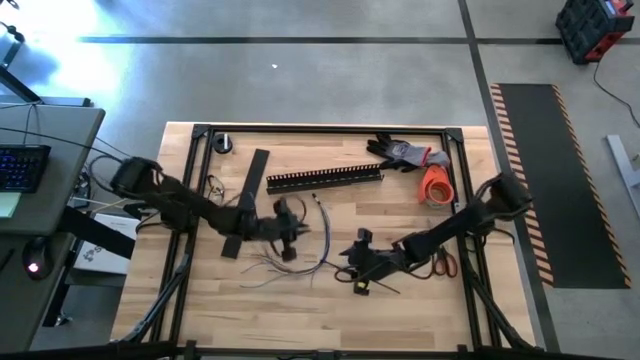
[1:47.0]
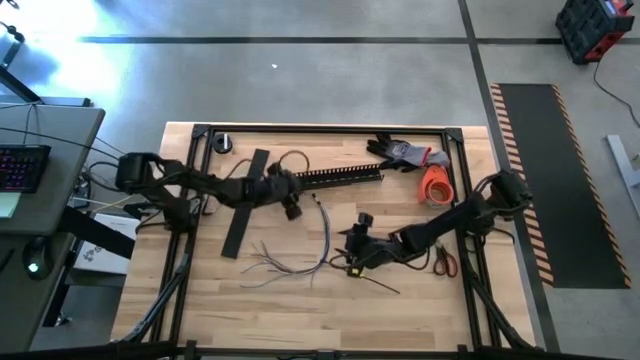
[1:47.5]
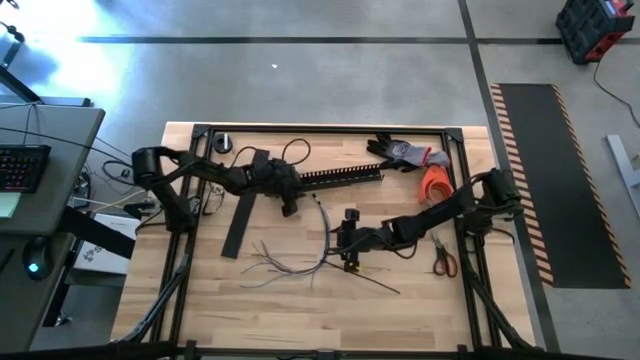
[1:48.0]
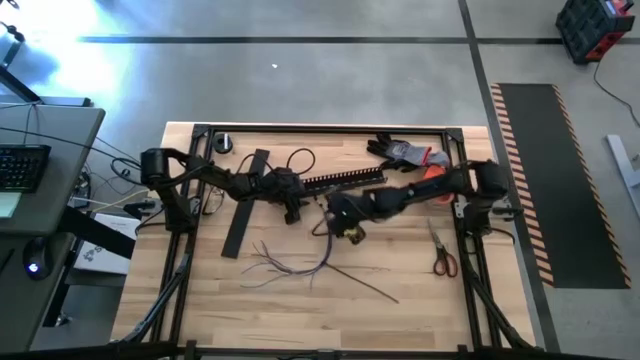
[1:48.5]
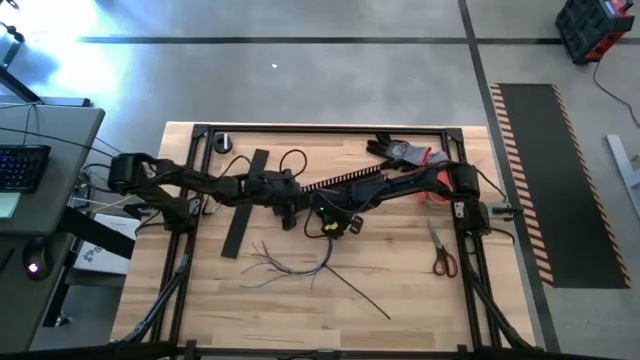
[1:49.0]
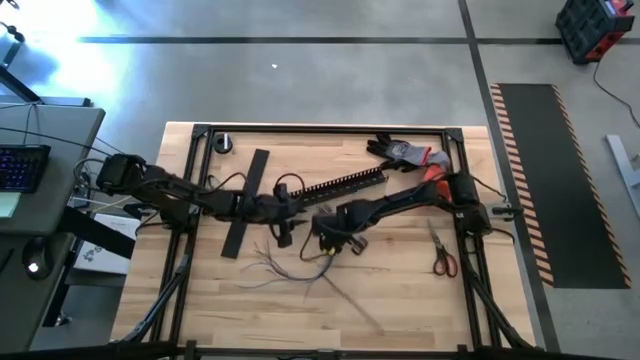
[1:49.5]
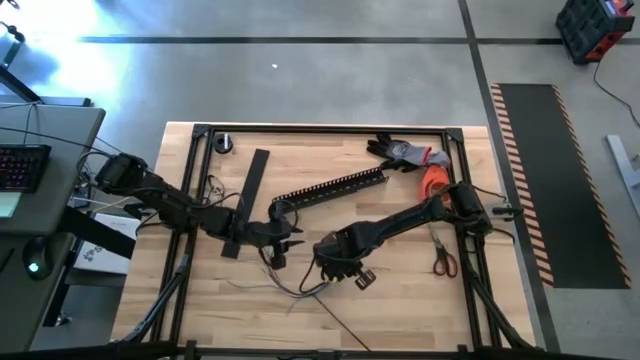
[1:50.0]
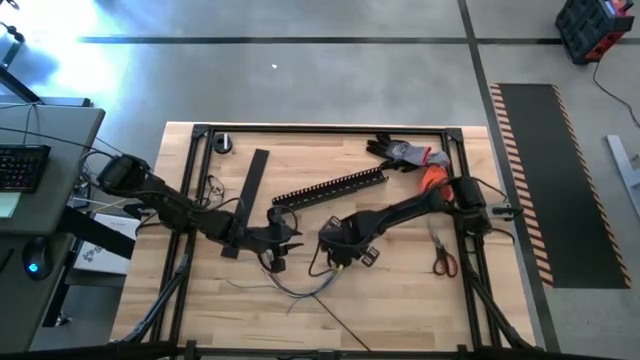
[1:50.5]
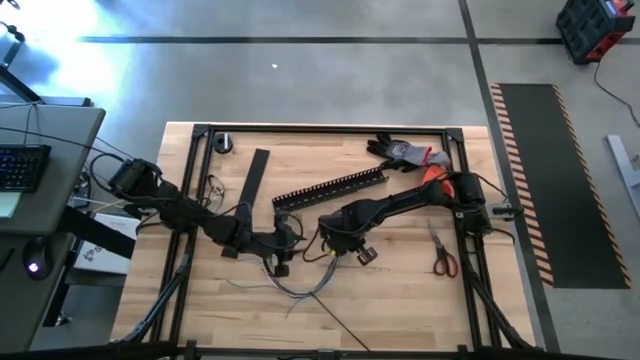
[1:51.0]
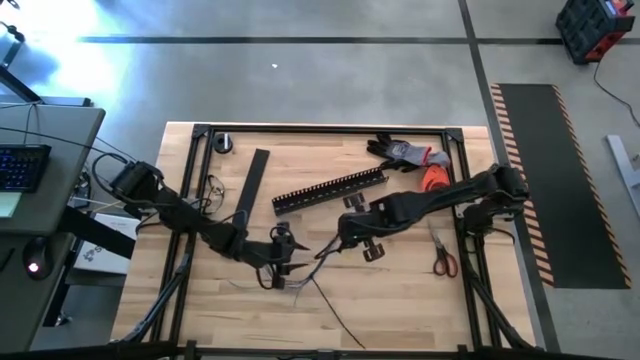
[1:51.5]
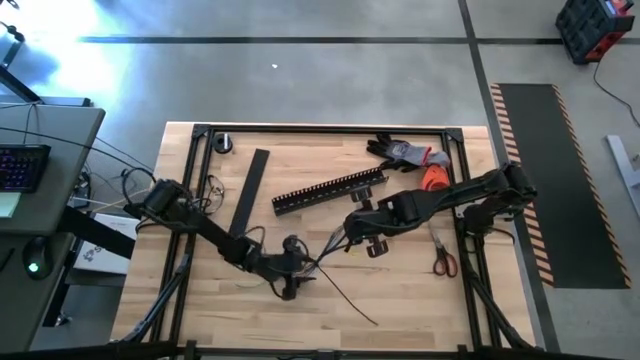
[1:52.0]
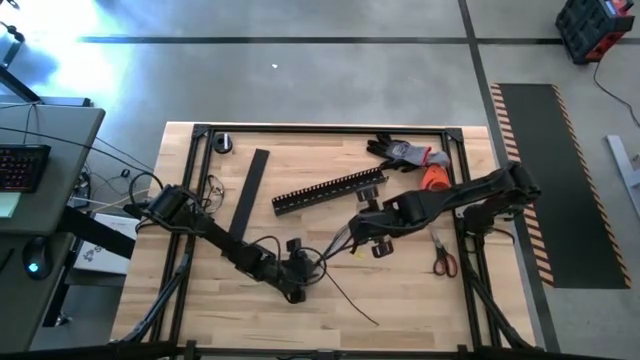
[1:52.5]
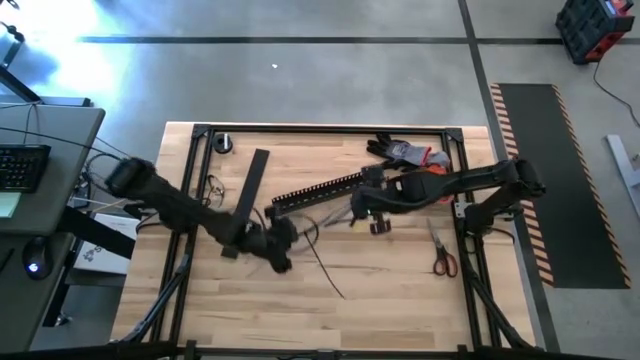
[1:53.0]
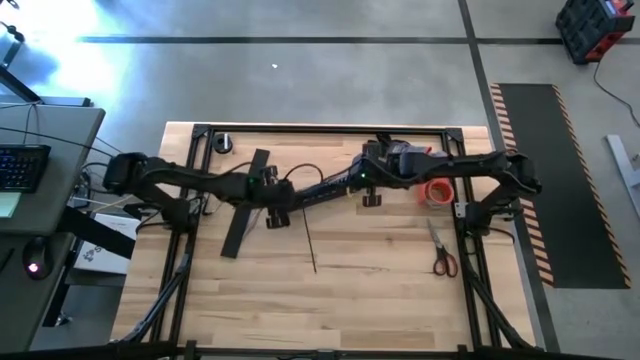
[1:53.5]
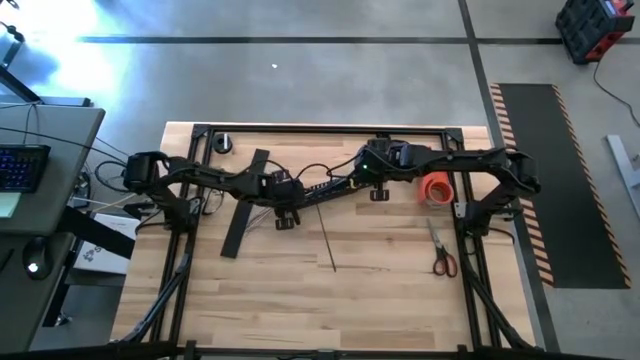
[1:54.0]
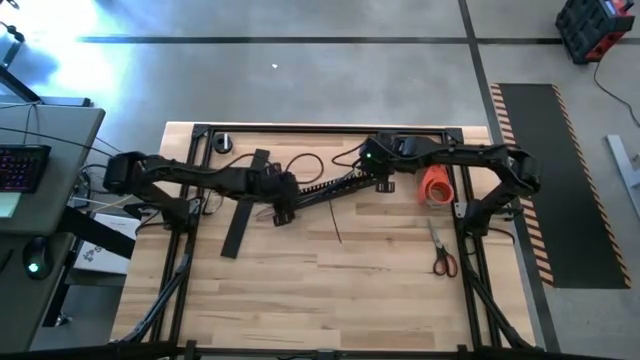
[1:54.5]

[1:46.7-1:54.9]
Task: Ziptie cables
Put the zip-tied cables into the black cable duct

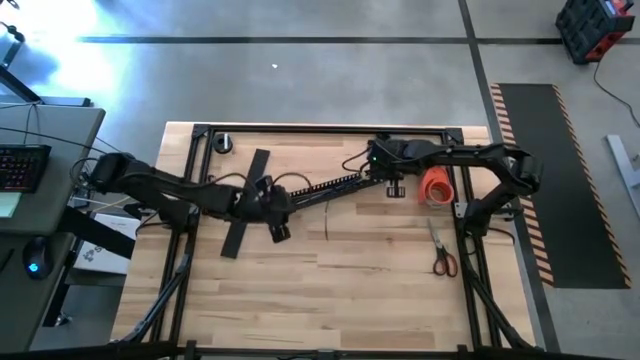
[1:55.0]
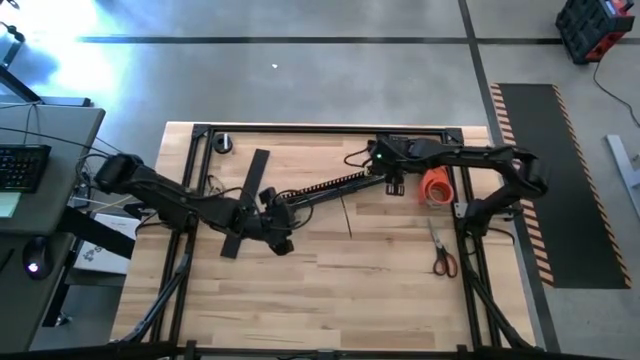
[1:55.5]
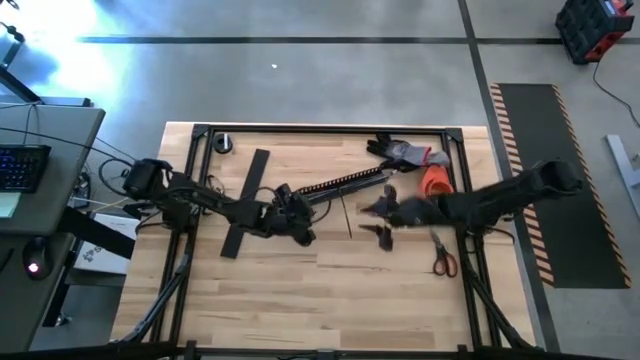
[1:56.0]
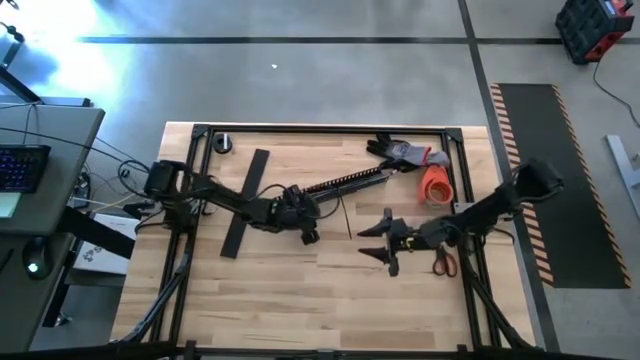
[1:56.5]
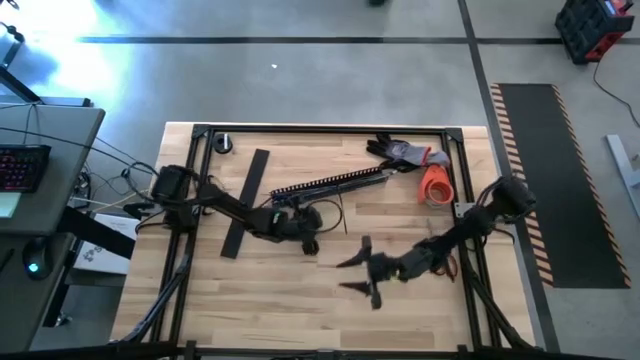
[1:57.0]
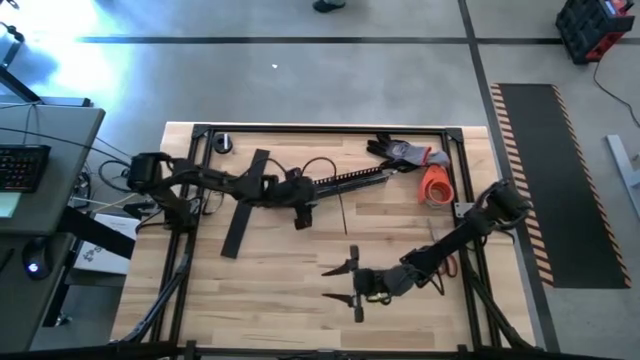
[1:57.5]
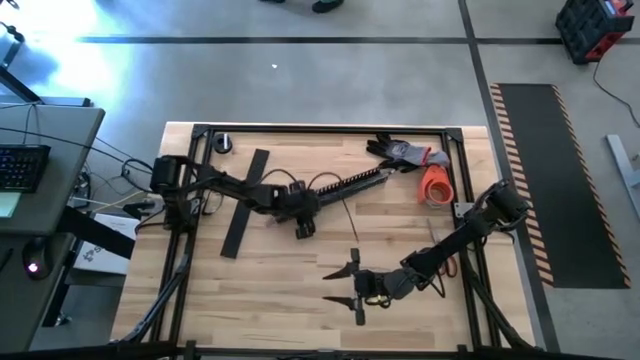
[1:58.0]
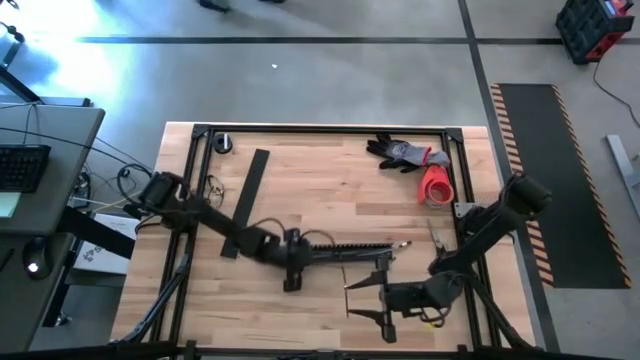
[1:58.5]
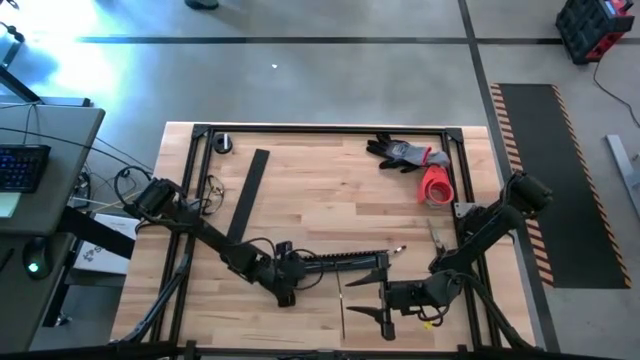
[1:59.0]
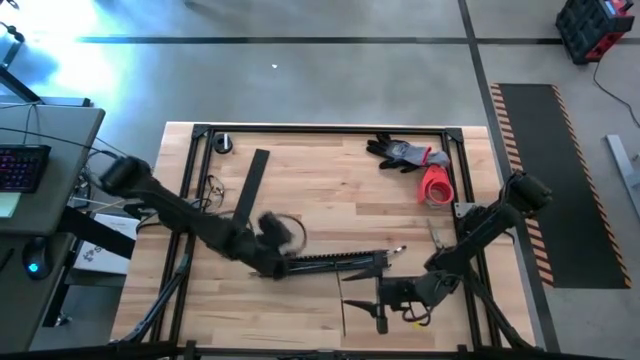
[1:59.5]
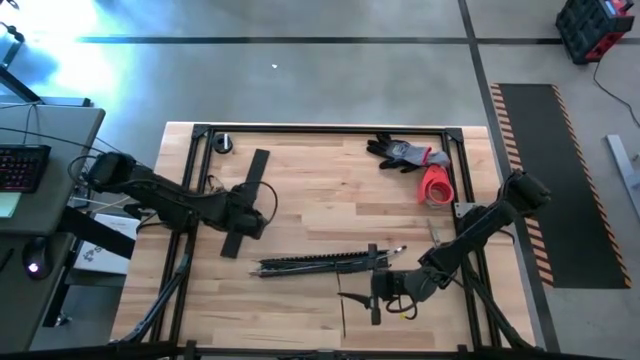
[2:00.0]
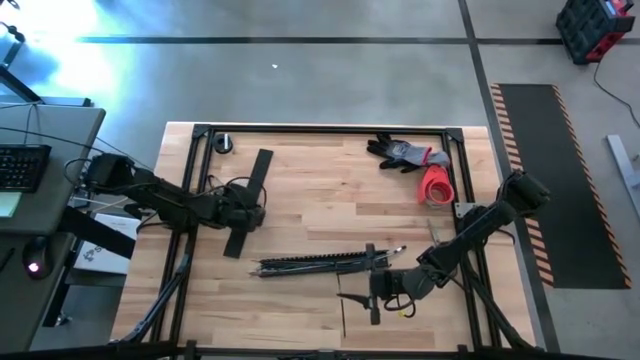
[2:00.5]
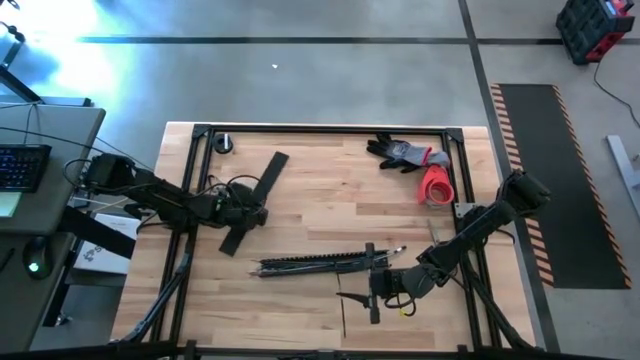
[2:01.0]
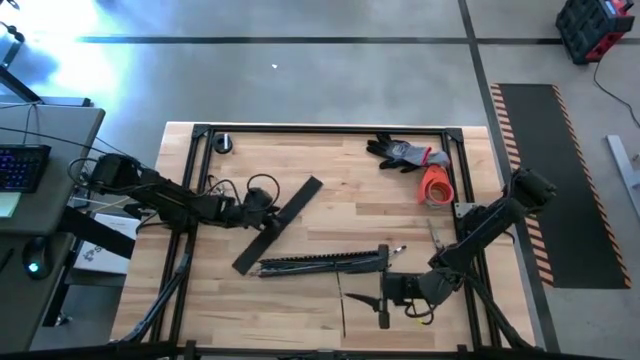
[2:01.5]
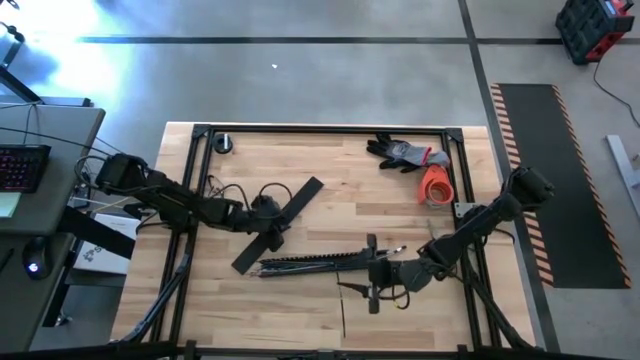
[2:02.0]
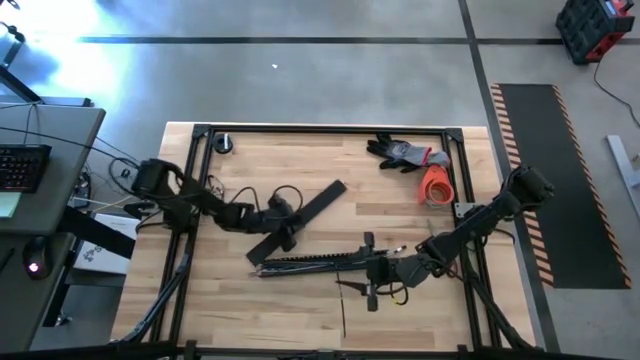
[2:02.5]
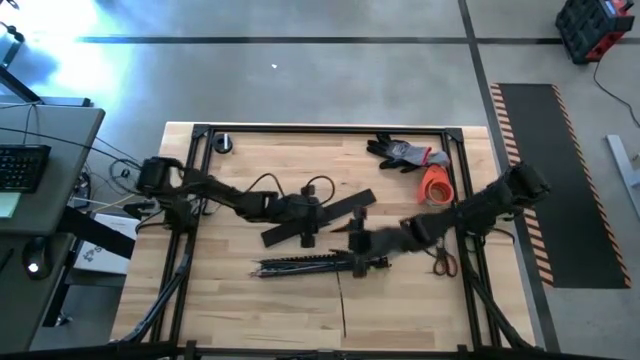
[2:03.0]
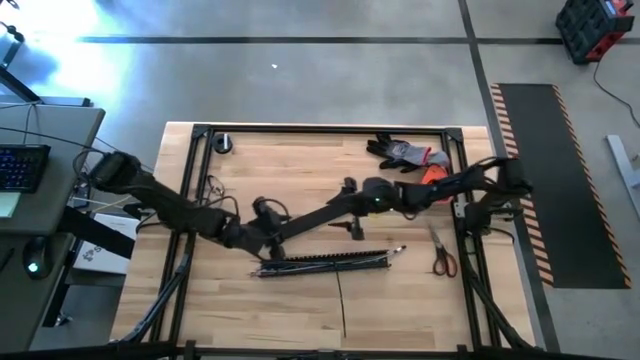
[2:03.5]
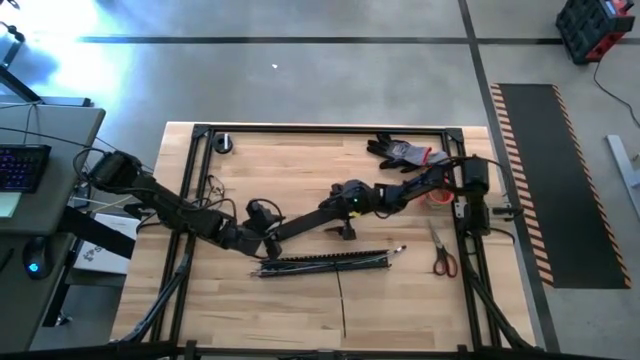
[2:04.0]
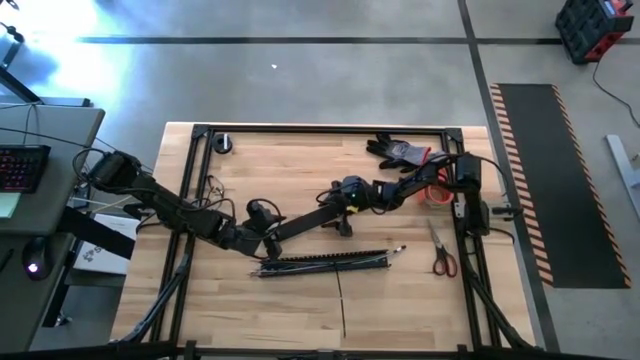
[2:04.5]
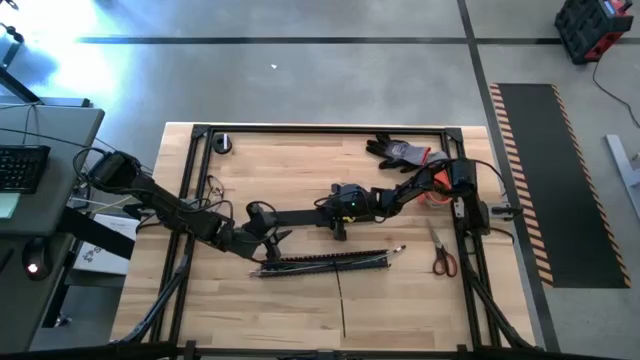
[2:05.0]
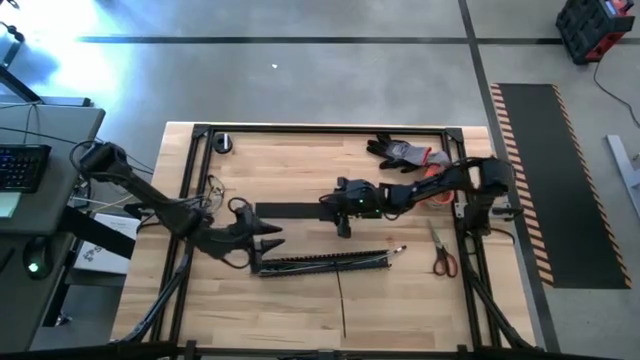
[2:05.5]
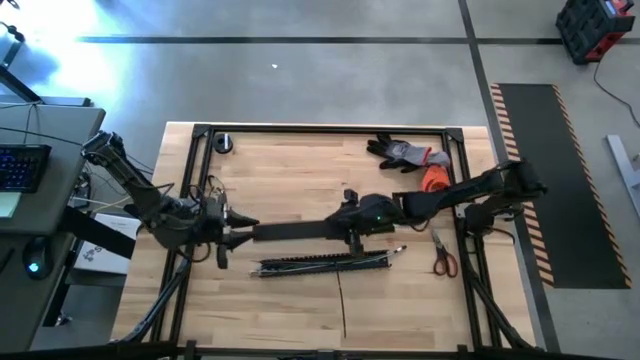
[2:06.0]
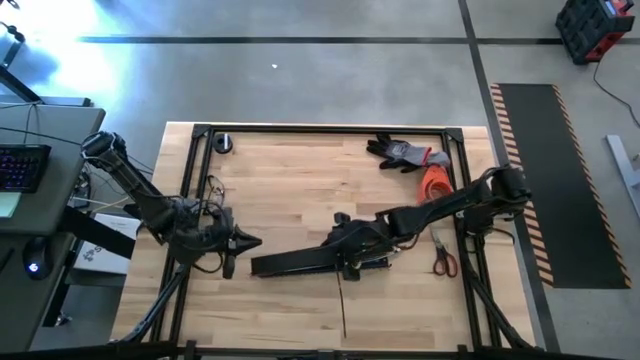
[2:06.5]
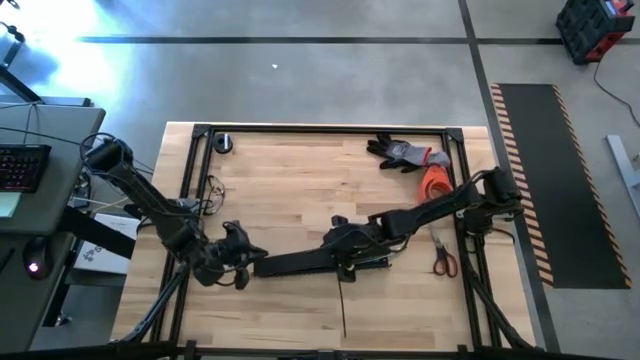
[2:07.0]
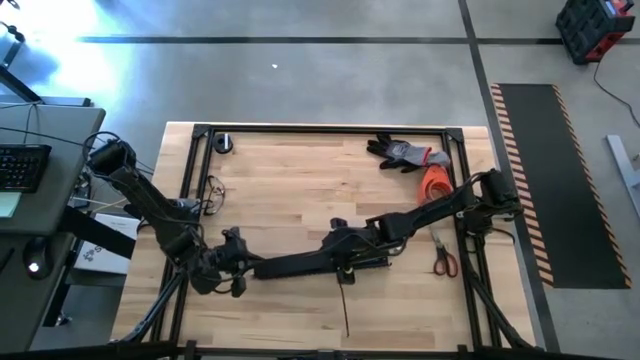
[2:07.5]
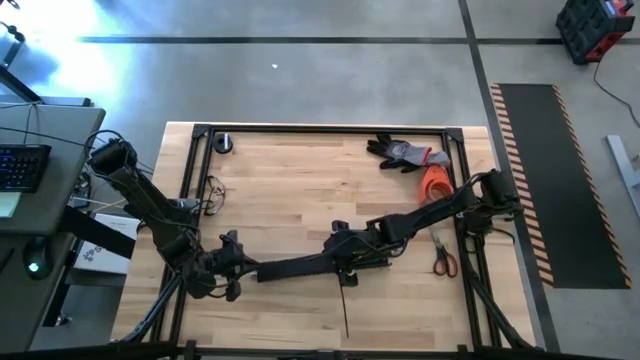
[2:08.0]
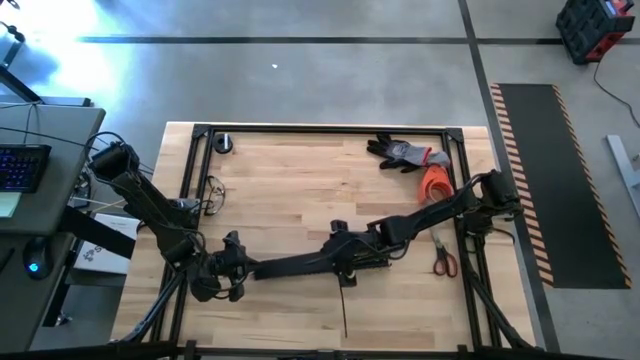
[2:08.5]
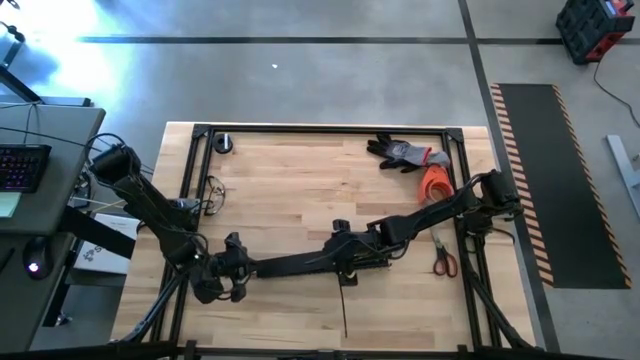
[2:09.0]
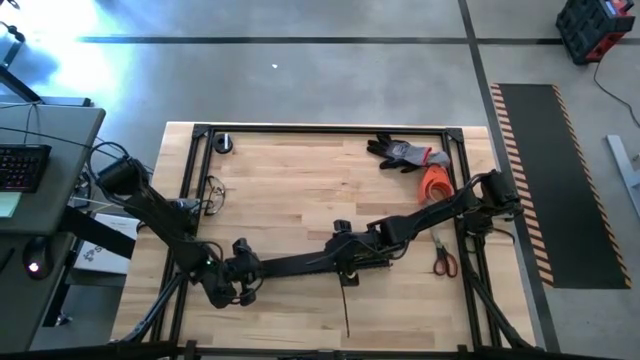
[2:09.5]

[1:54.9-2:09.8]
Close the black cable duct
